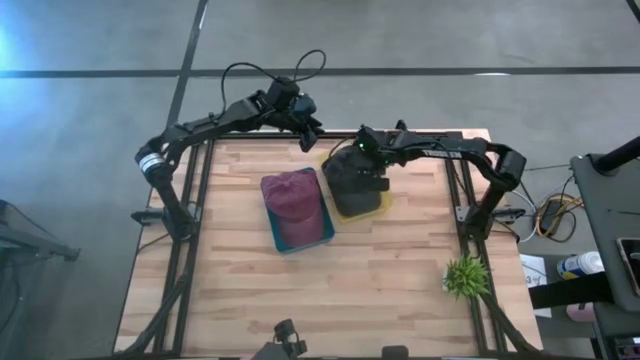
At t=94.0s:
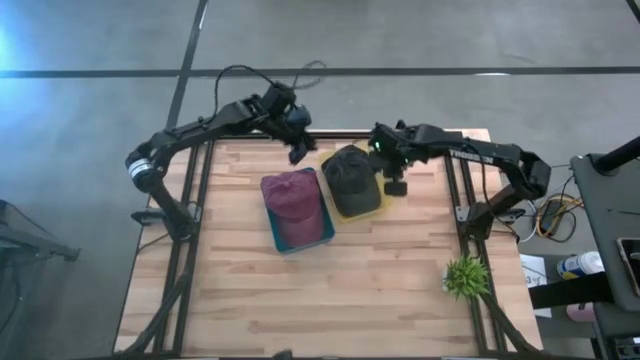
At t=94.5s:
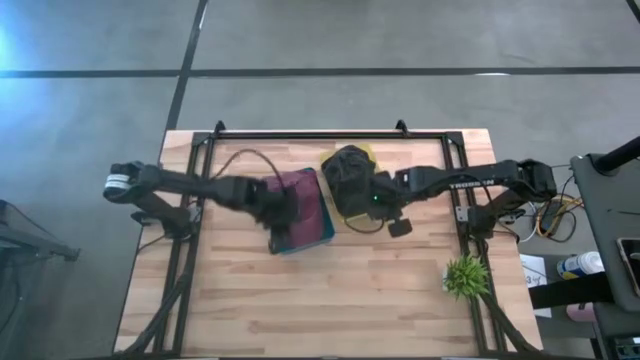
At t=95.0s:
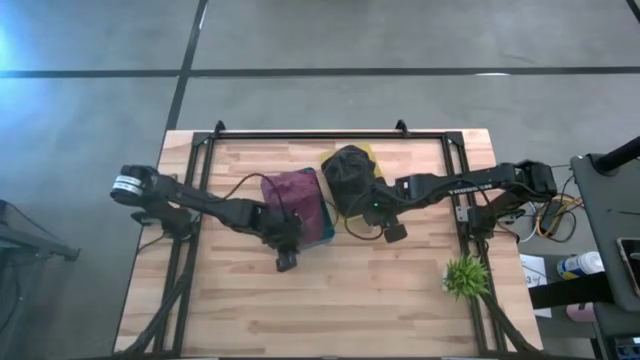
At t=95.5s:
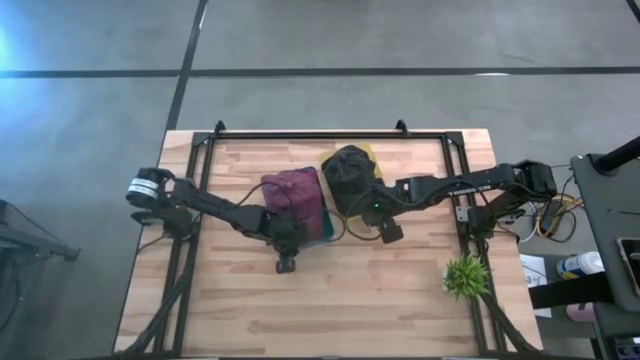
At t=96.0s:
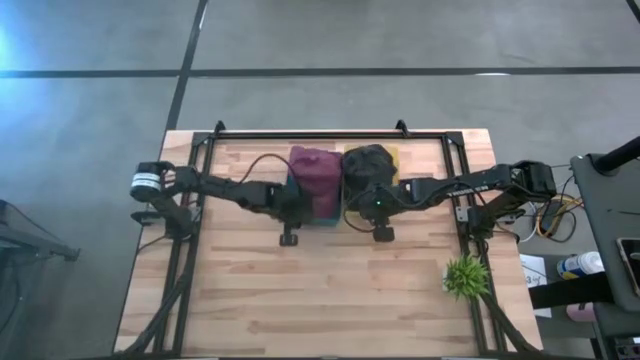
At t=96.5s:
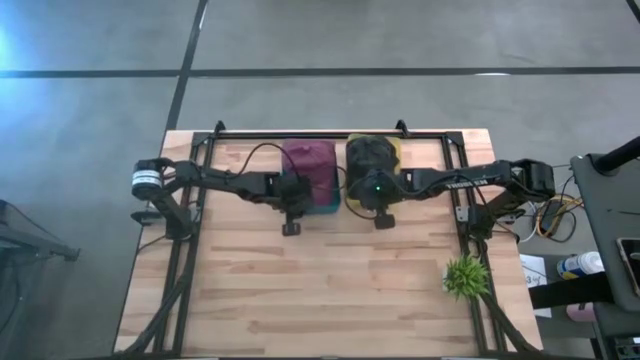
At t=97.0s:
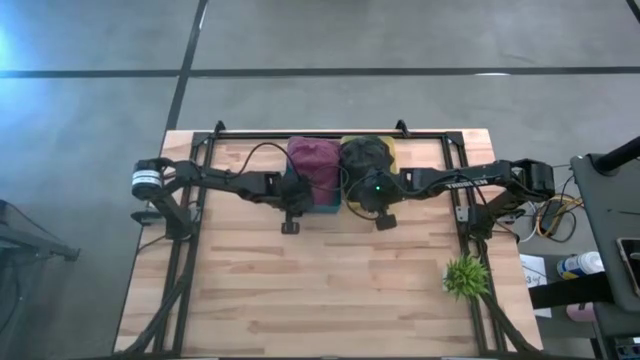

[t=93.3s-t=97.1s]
Task: Pick & Place hat
Adjust the bins from the table

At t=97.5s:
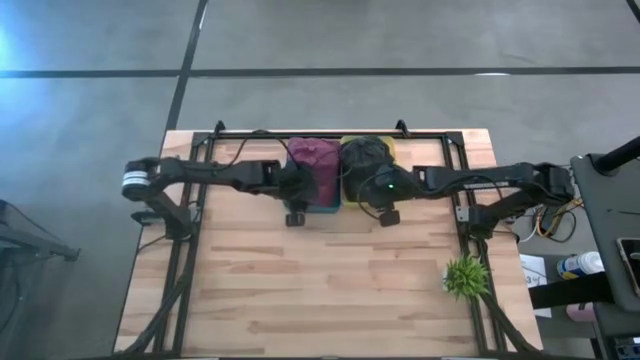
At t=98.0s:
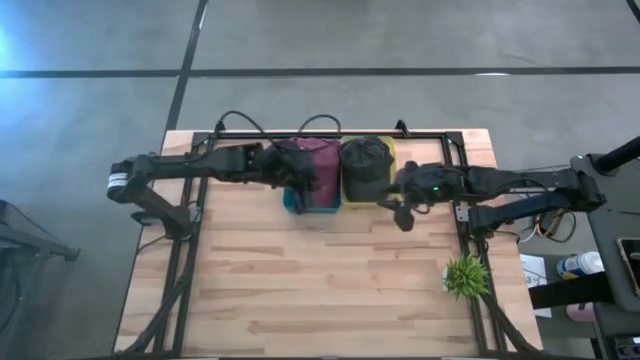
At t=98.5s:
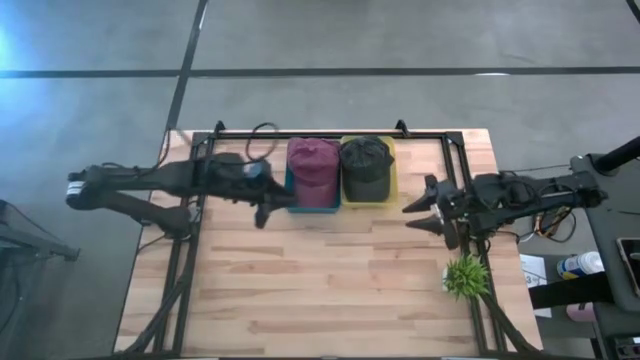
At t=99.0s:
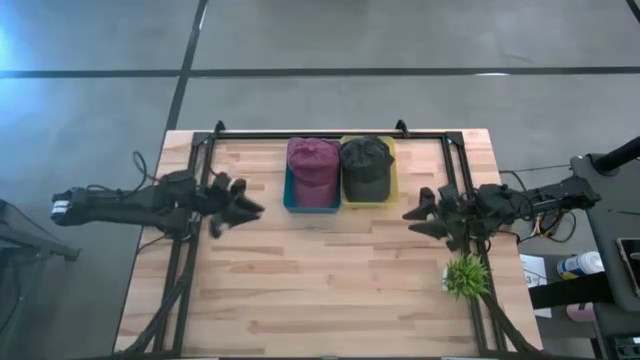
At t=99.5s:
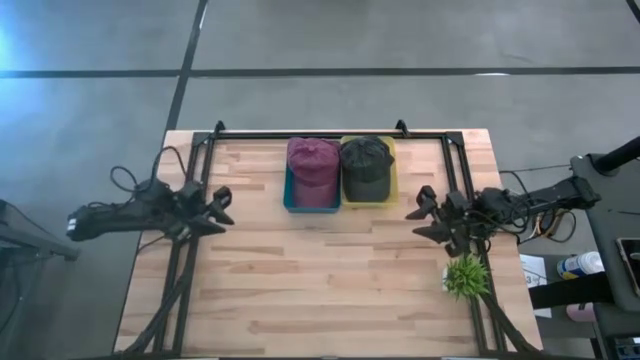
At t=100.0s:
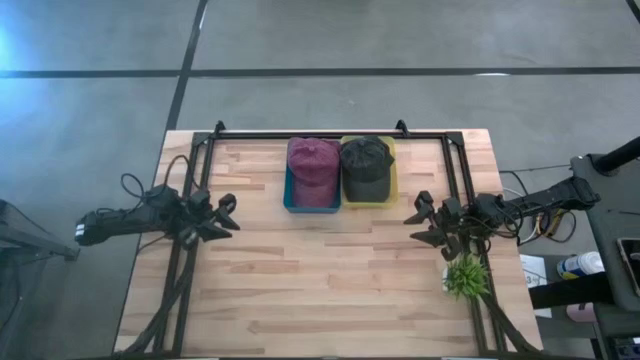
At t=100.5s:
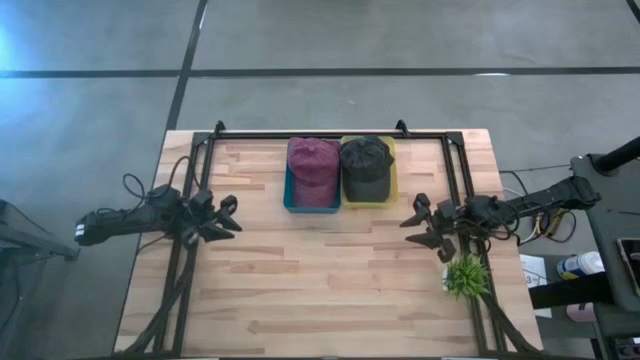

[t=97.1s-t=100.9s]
Return to Home Position

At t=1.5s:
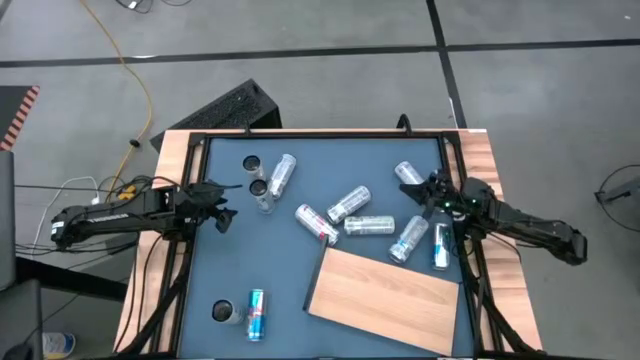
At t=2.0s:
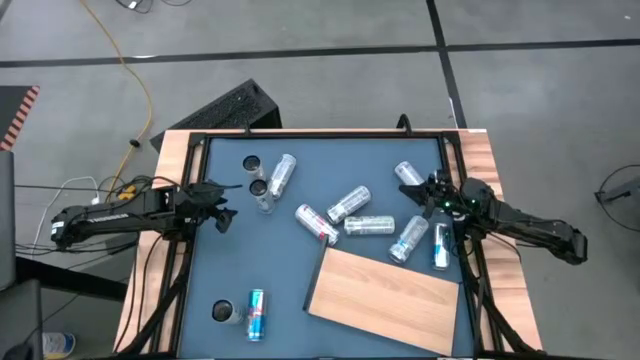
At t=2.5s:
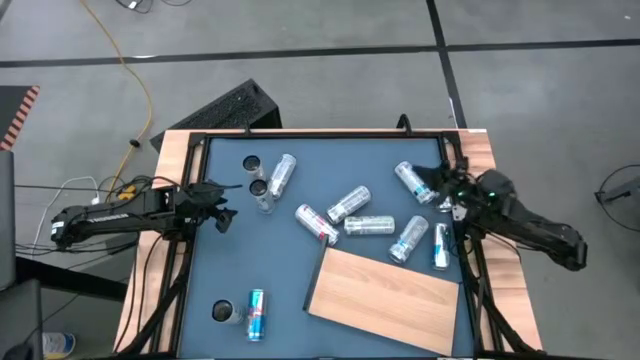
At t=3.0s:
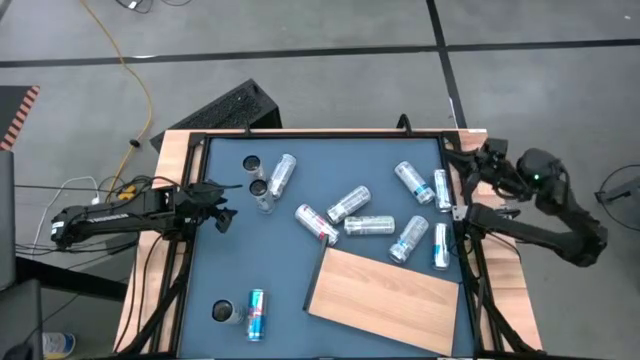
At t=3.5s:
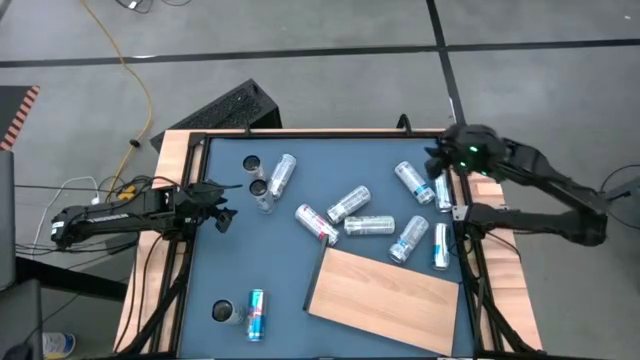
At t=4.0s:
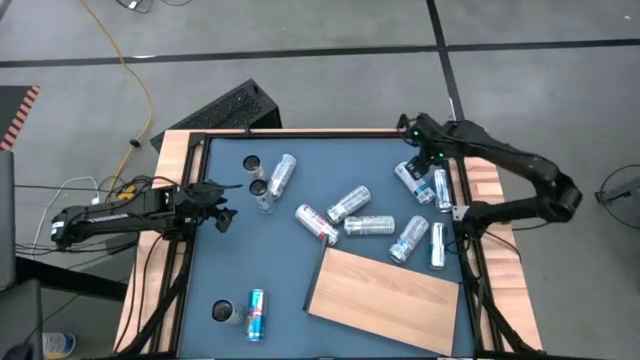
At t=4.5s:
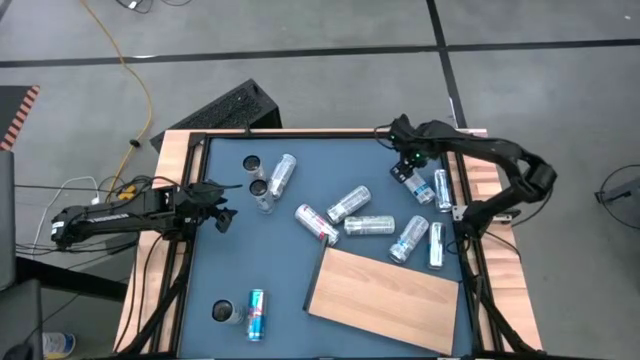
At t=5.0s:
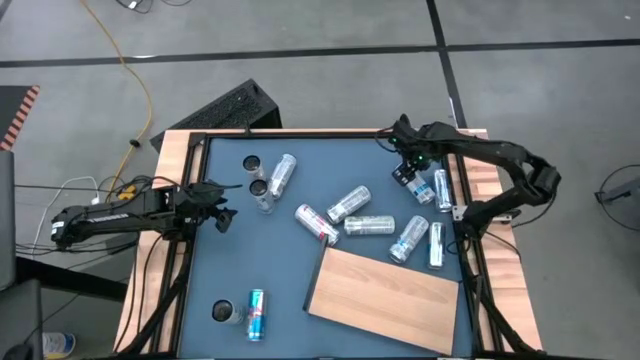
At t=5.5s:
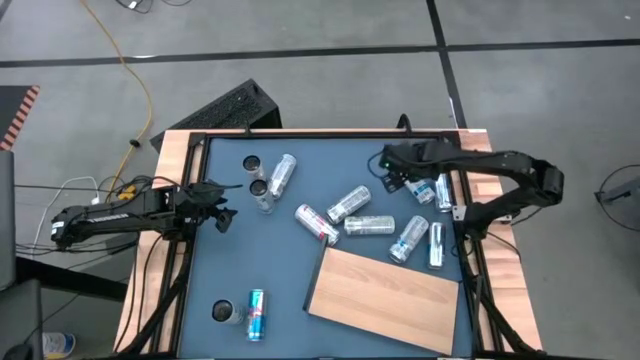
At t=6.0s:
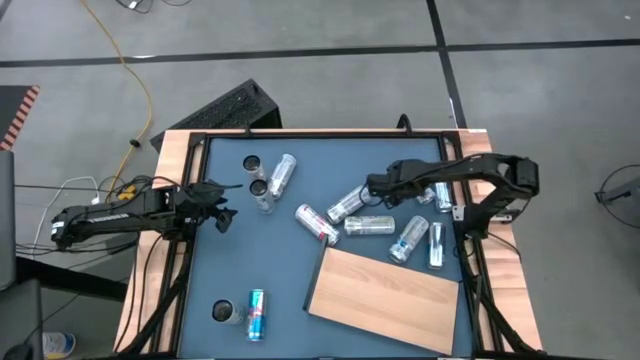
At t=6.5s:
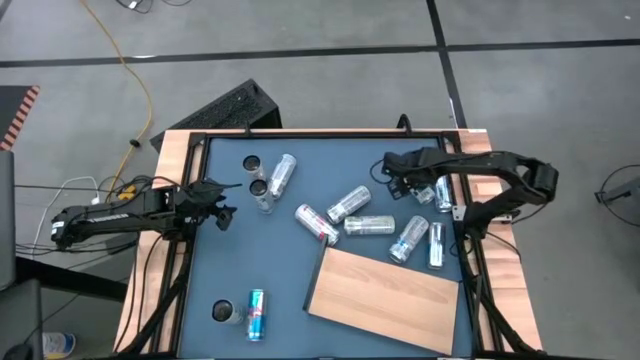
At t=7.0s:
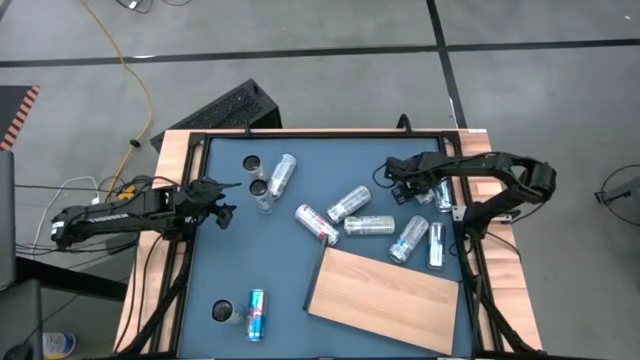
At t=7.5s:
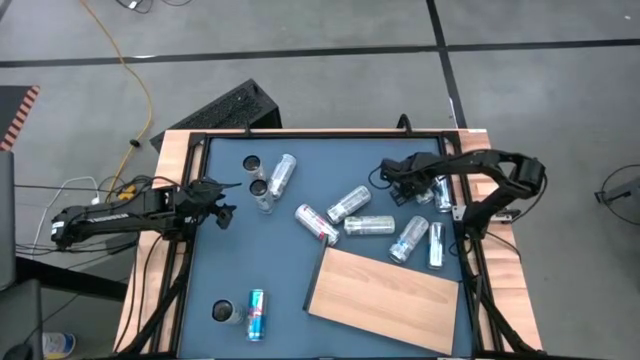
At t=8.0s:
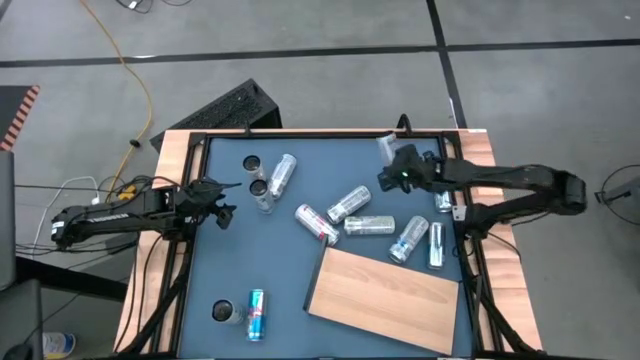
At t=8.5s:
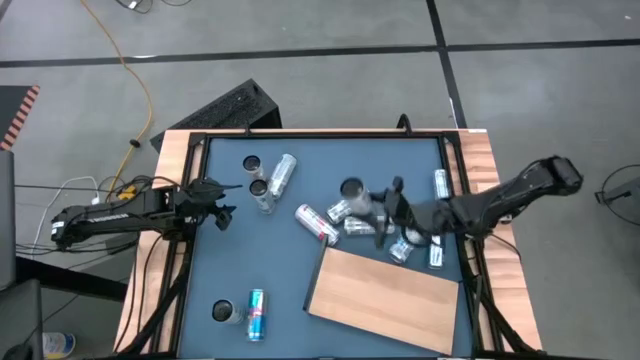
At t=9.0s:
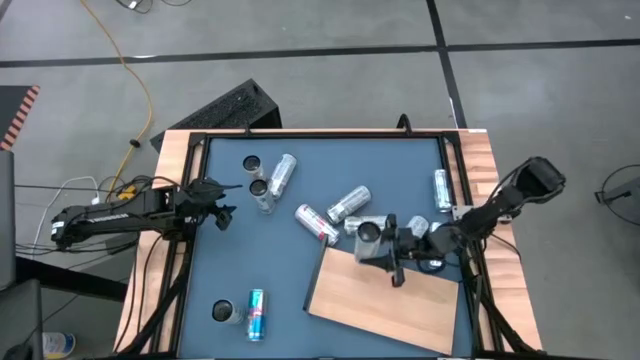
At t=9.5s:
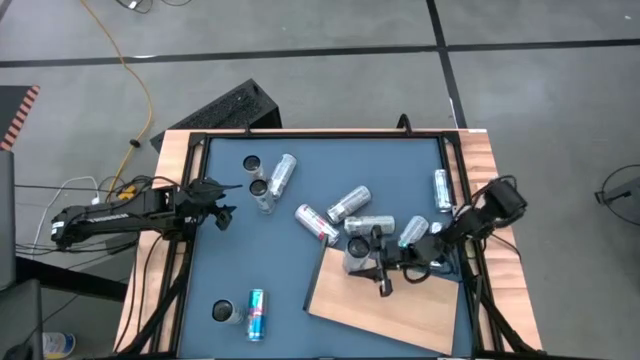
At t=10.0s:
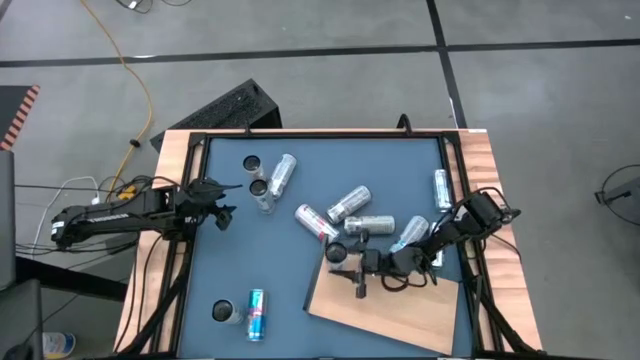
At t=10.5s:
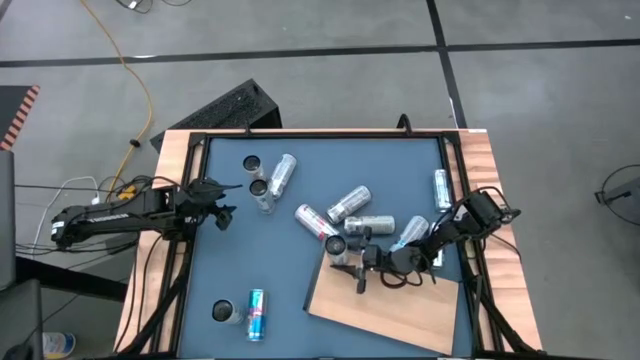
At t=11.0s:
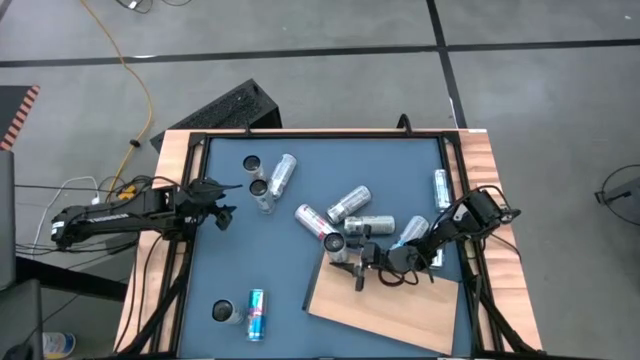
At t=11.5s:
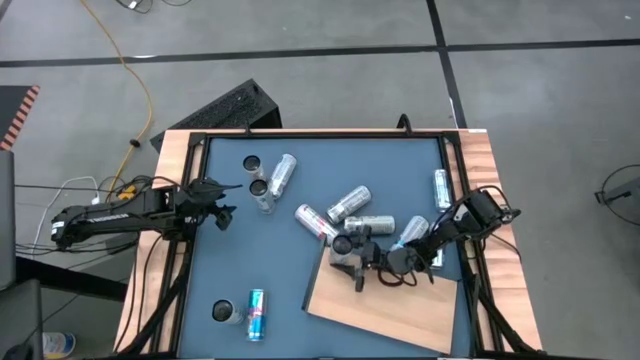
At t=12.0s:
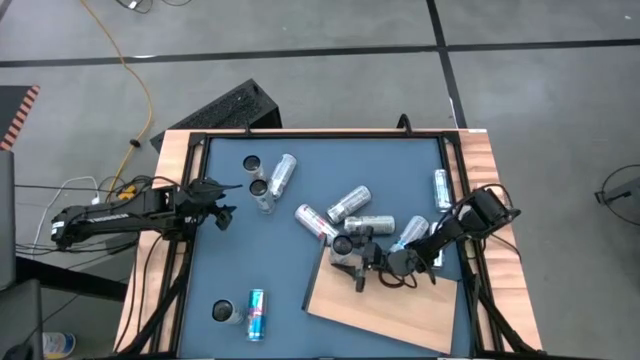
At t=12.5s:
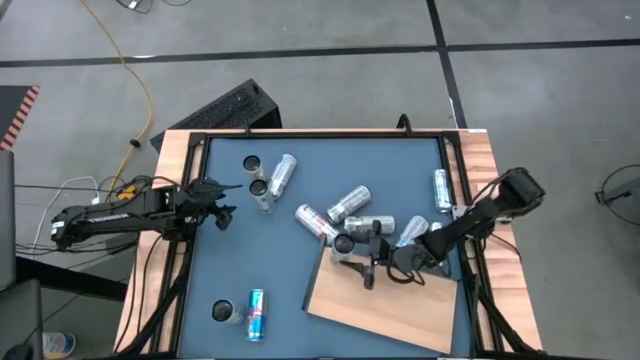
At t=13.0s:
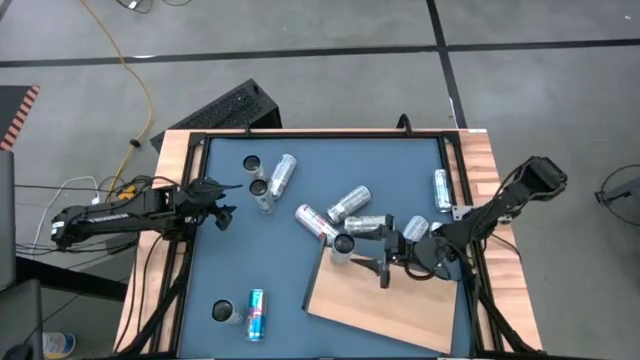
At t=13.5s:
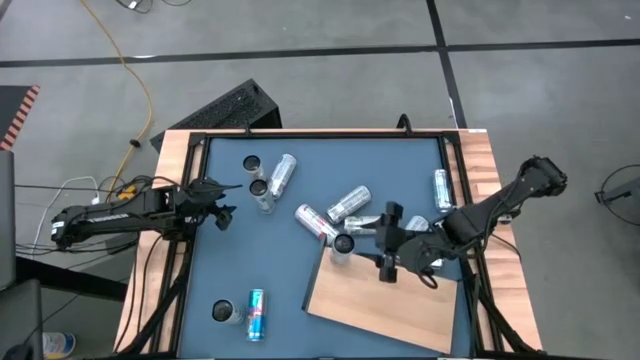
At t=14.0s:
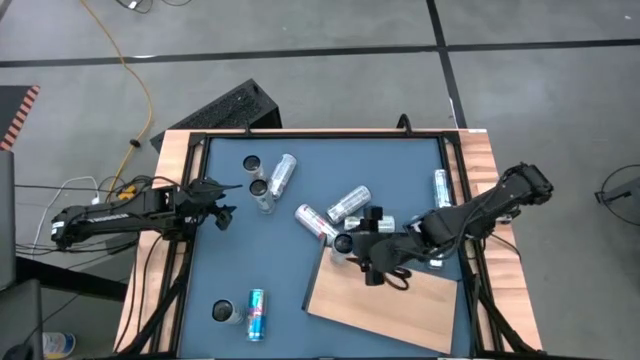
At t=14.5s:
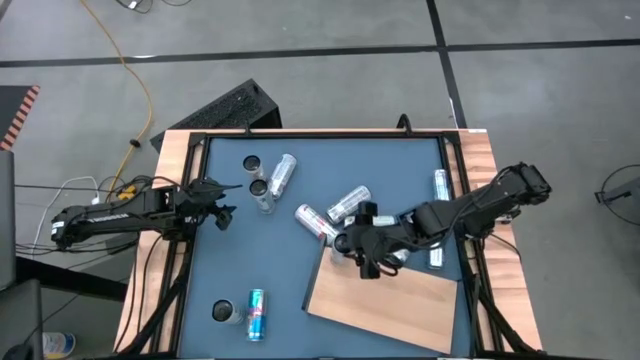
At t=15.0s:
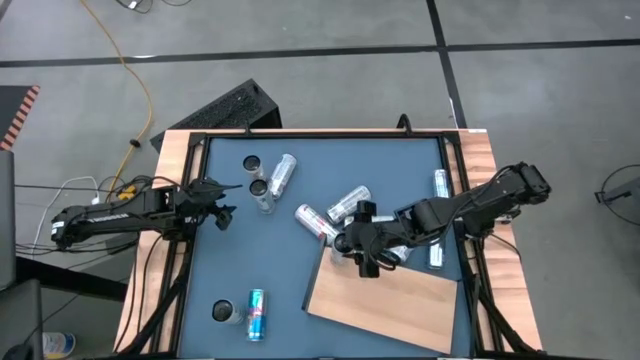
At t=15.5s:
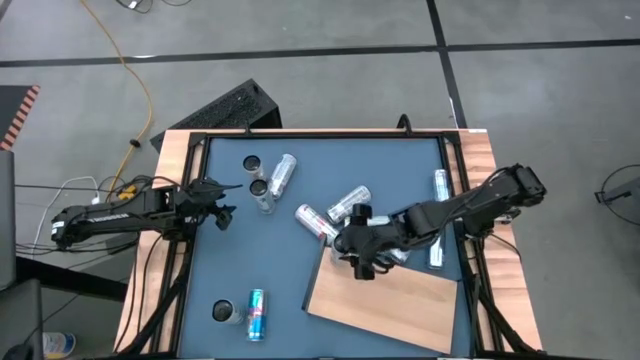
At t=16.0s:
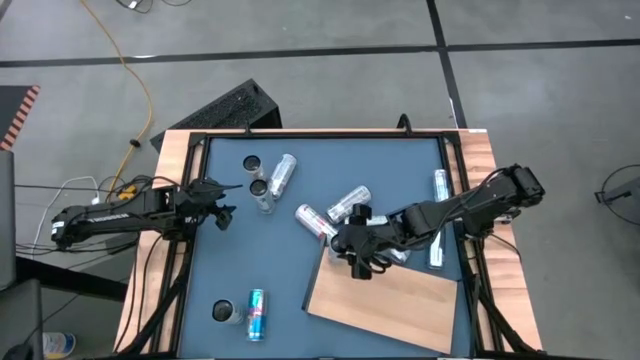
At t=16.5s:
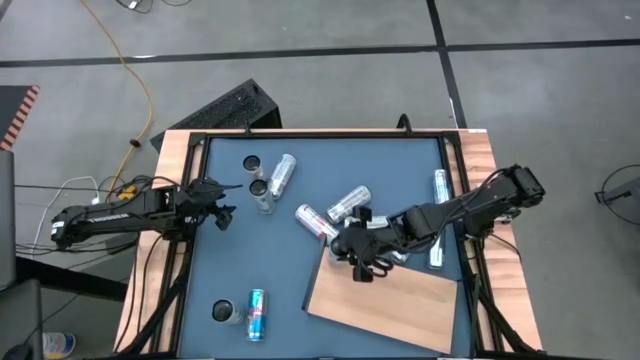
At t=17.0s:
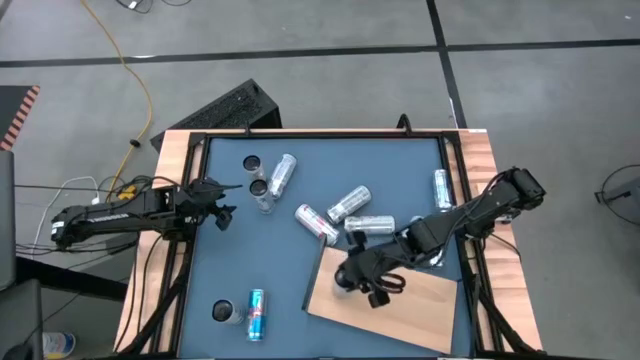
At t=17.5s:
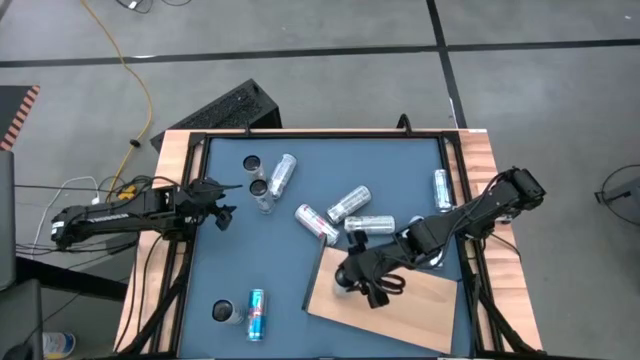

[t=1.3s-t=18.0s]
Task: Place canned beverage on shelf
Put the top white blue soda can on the shelf
